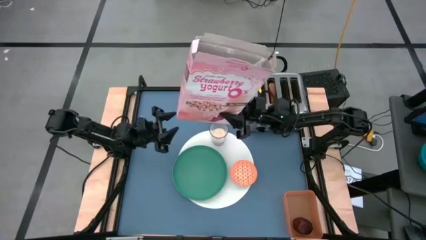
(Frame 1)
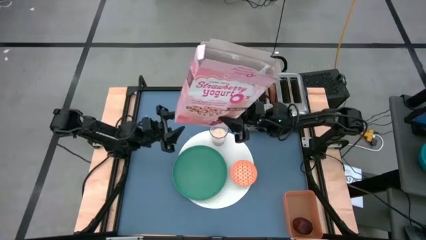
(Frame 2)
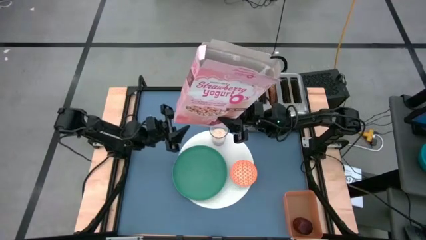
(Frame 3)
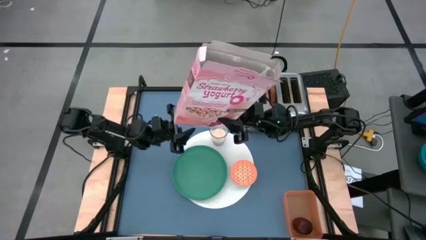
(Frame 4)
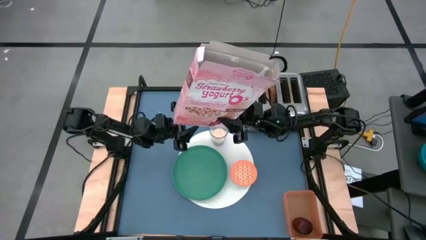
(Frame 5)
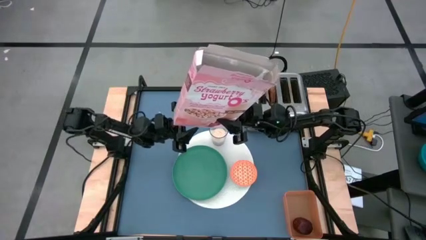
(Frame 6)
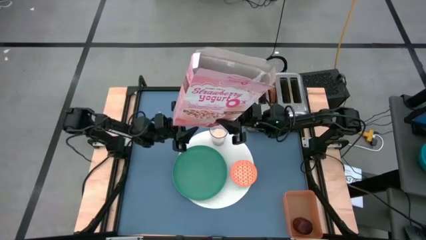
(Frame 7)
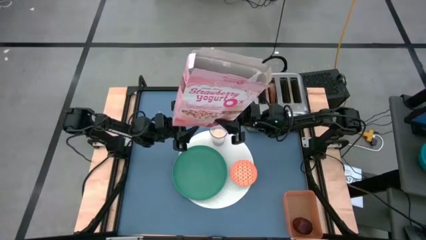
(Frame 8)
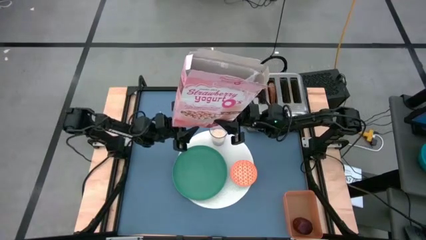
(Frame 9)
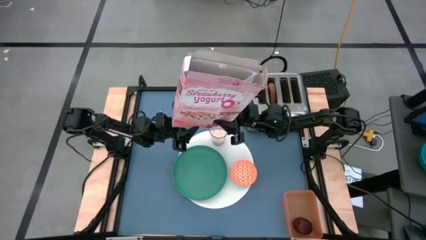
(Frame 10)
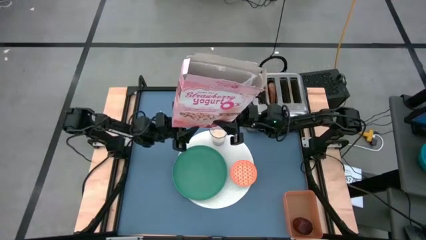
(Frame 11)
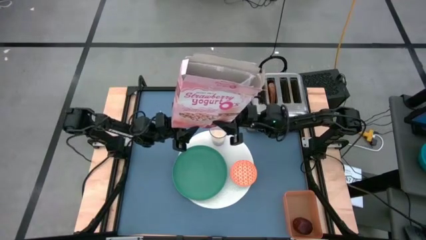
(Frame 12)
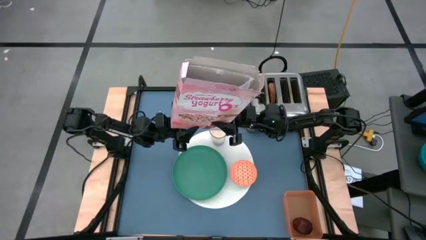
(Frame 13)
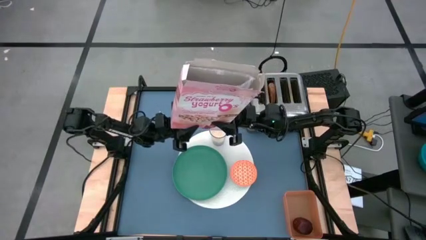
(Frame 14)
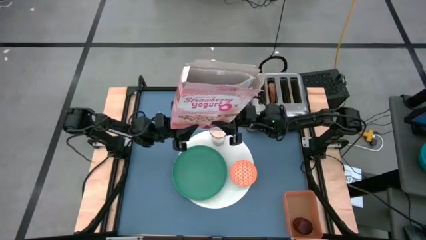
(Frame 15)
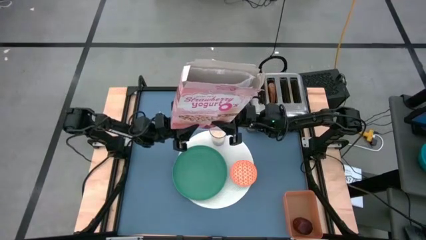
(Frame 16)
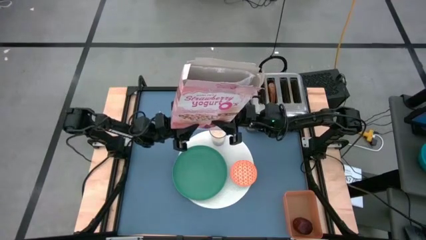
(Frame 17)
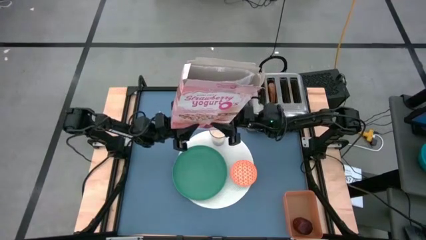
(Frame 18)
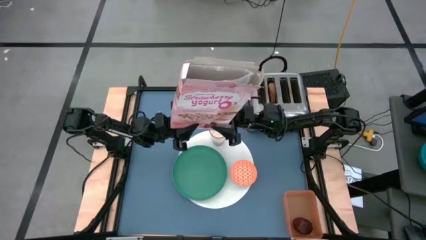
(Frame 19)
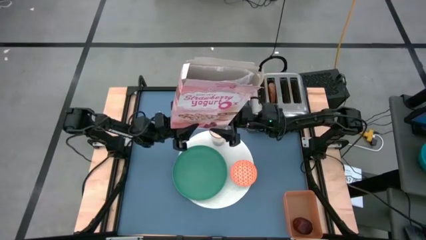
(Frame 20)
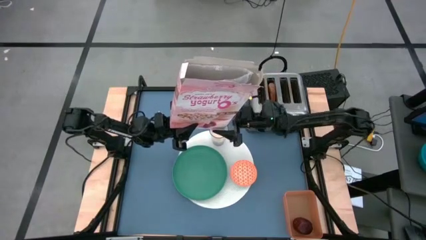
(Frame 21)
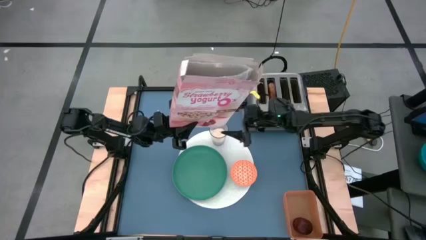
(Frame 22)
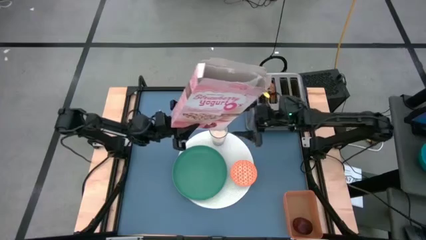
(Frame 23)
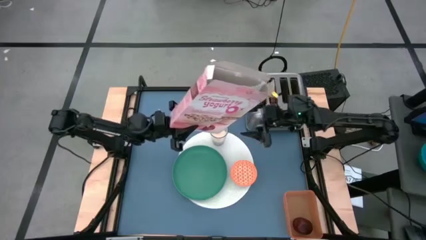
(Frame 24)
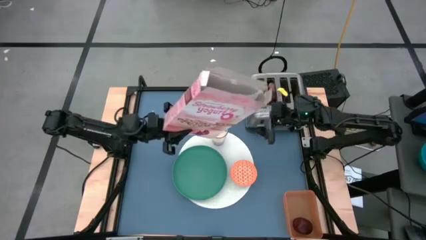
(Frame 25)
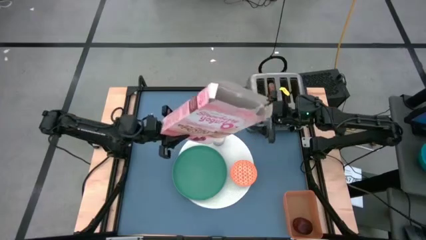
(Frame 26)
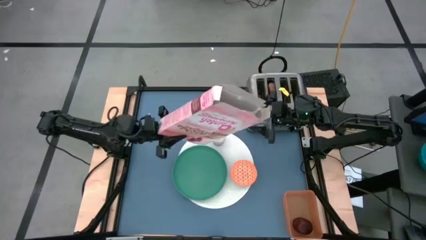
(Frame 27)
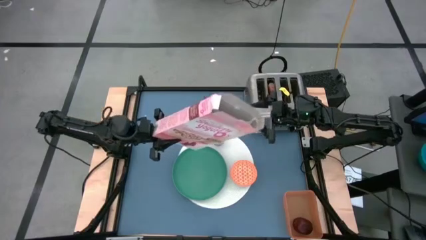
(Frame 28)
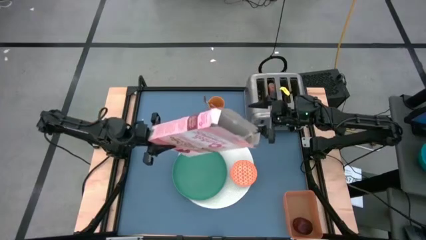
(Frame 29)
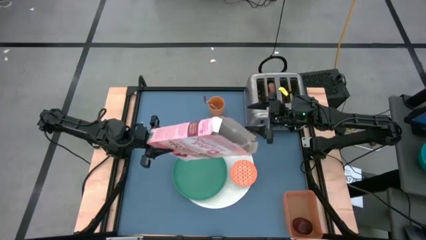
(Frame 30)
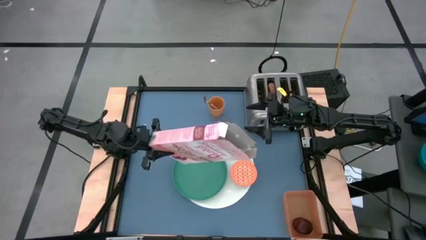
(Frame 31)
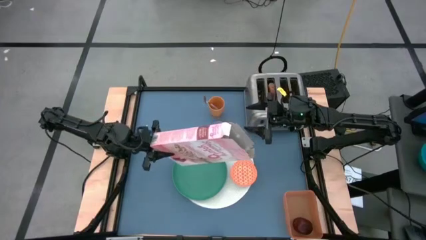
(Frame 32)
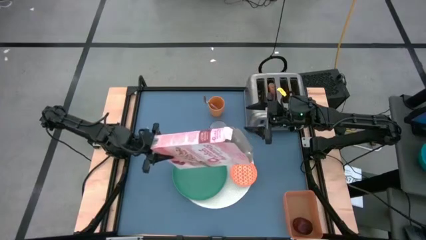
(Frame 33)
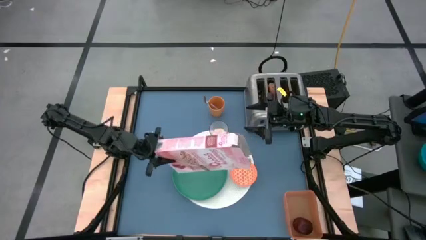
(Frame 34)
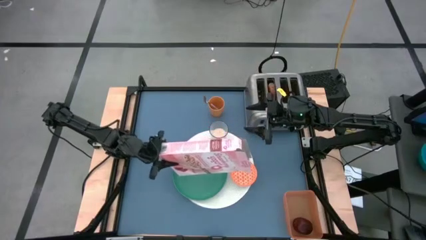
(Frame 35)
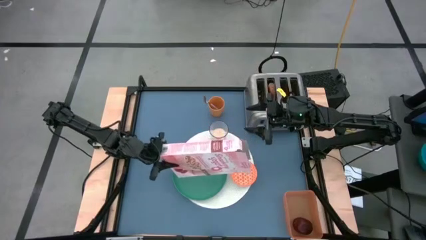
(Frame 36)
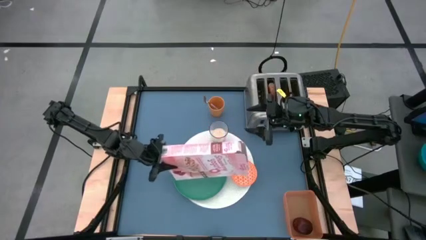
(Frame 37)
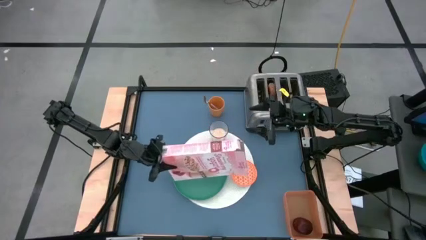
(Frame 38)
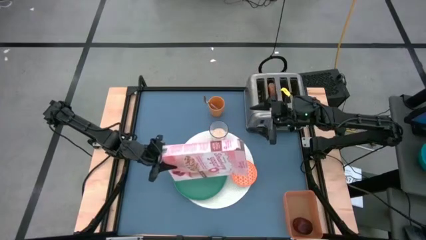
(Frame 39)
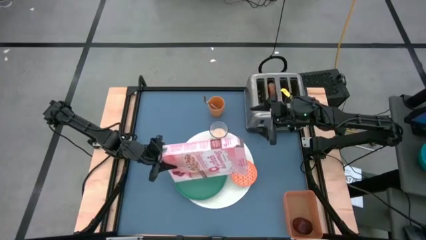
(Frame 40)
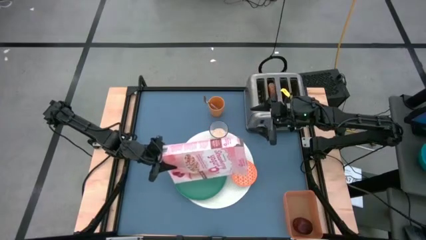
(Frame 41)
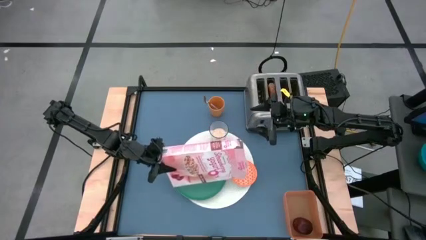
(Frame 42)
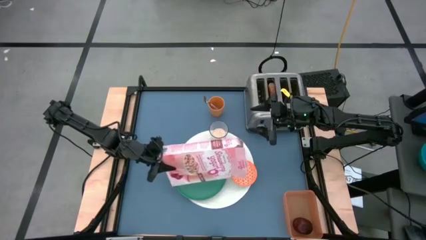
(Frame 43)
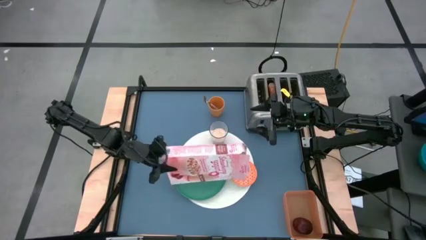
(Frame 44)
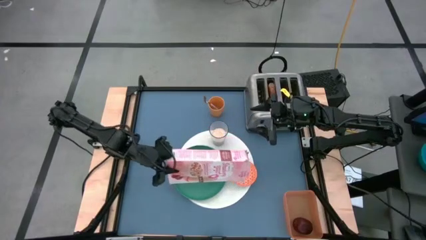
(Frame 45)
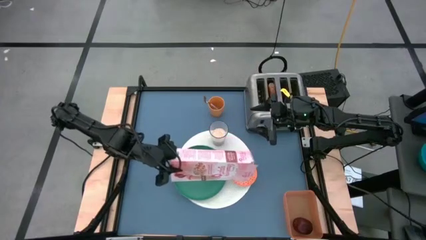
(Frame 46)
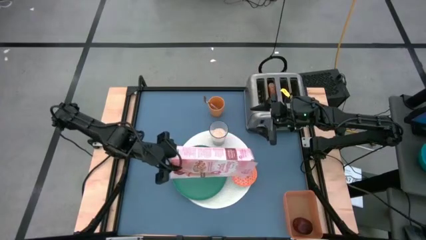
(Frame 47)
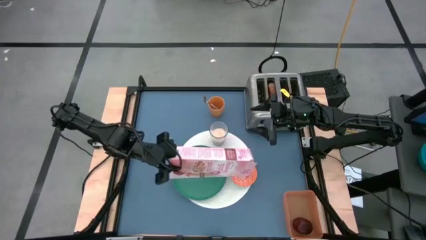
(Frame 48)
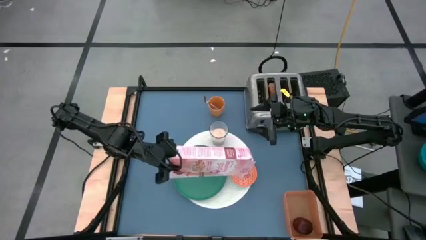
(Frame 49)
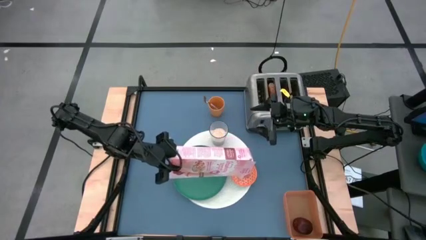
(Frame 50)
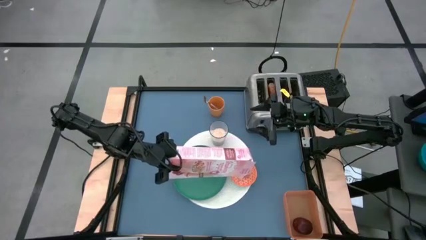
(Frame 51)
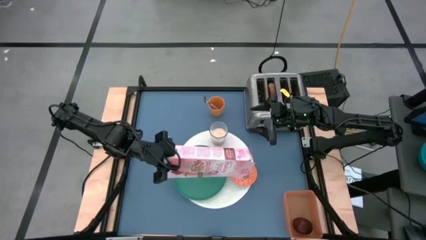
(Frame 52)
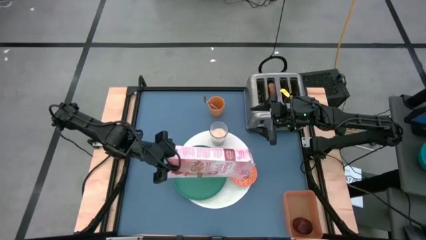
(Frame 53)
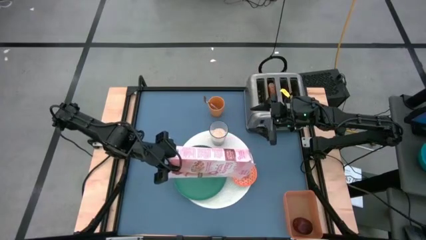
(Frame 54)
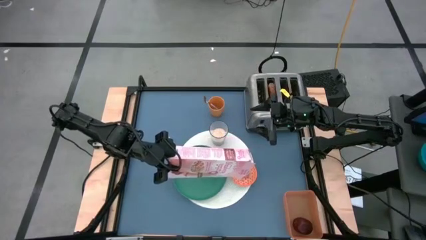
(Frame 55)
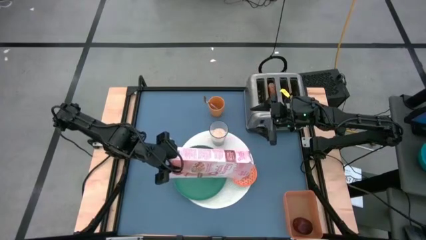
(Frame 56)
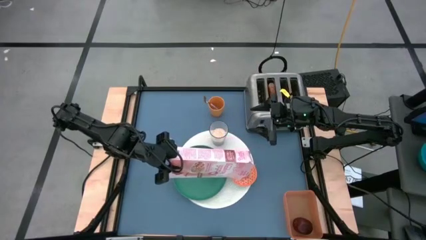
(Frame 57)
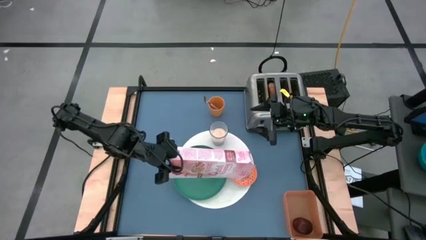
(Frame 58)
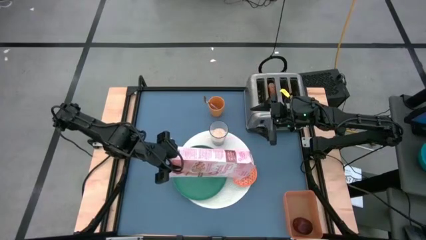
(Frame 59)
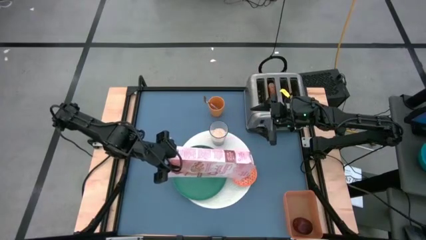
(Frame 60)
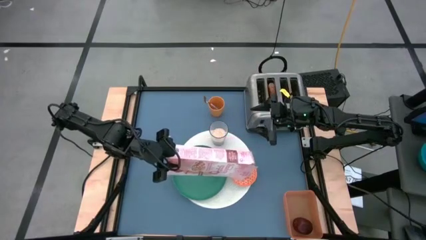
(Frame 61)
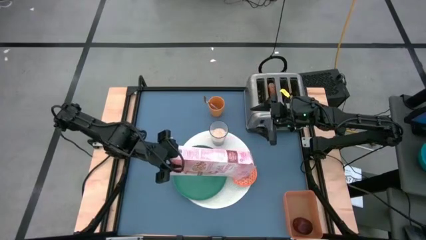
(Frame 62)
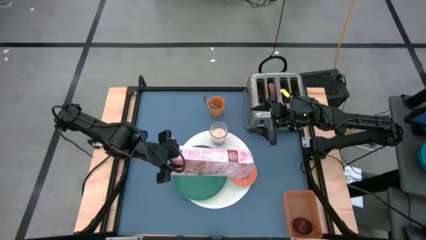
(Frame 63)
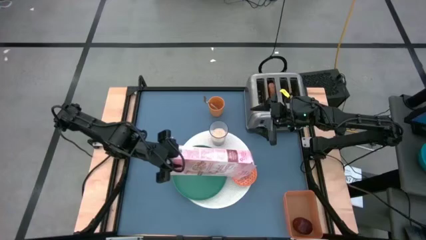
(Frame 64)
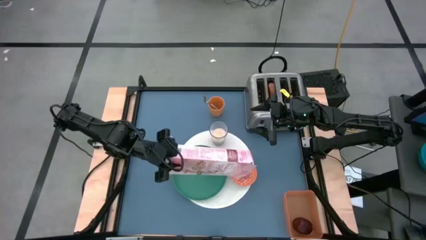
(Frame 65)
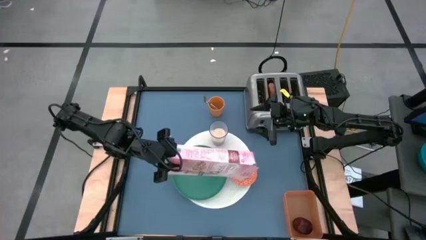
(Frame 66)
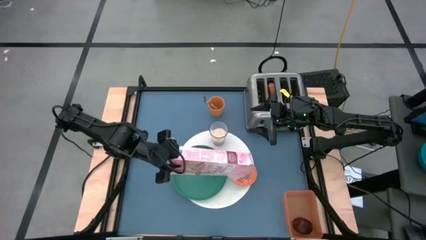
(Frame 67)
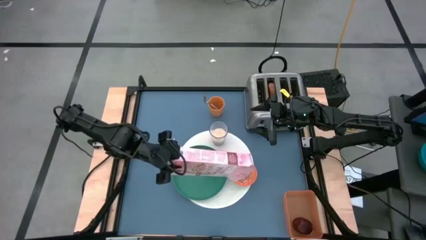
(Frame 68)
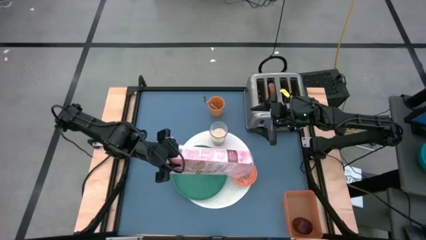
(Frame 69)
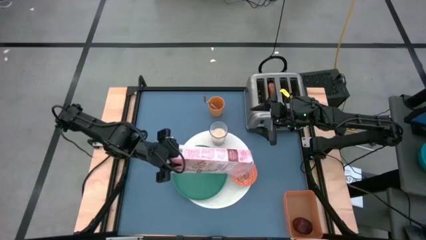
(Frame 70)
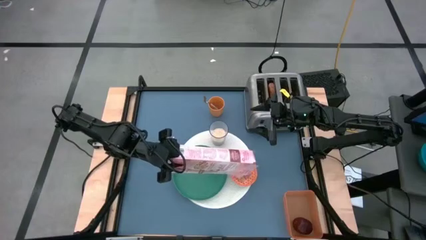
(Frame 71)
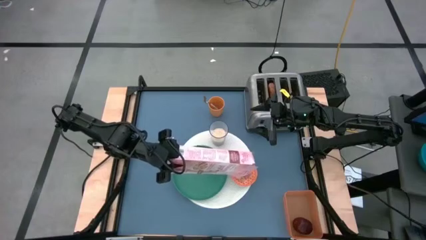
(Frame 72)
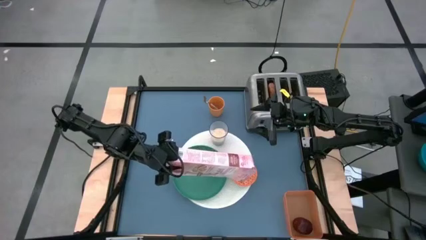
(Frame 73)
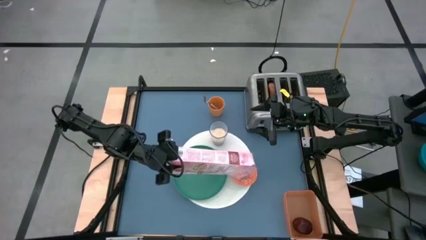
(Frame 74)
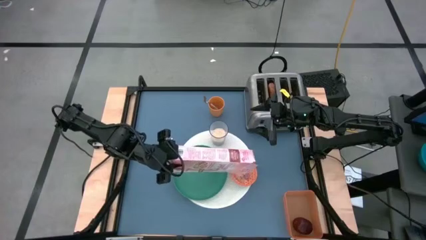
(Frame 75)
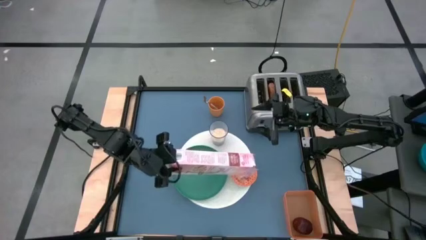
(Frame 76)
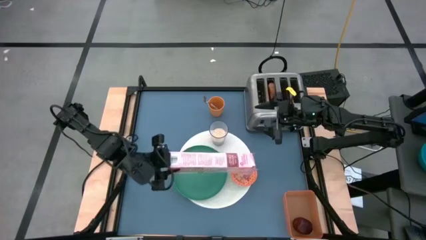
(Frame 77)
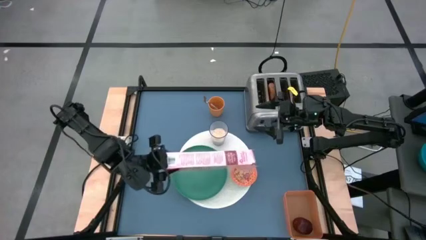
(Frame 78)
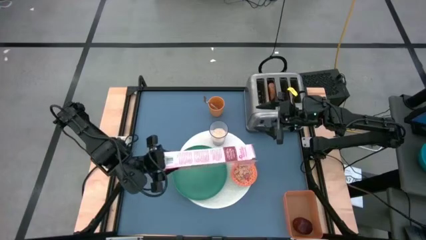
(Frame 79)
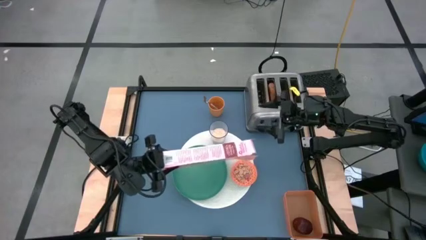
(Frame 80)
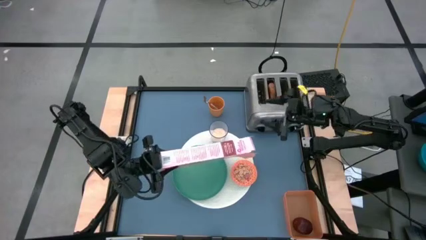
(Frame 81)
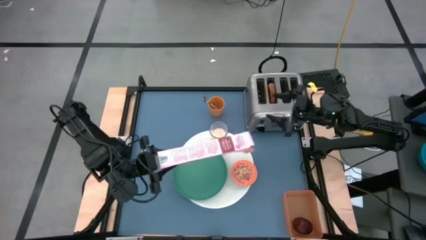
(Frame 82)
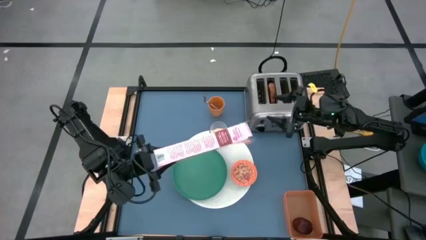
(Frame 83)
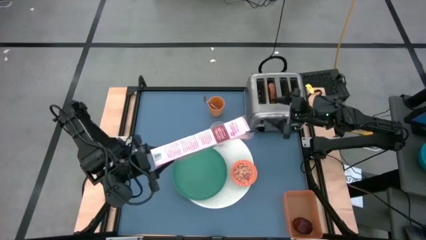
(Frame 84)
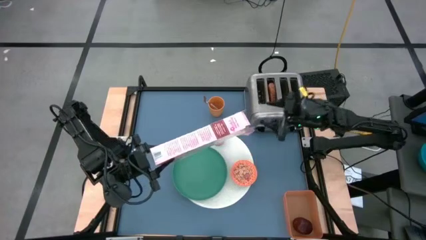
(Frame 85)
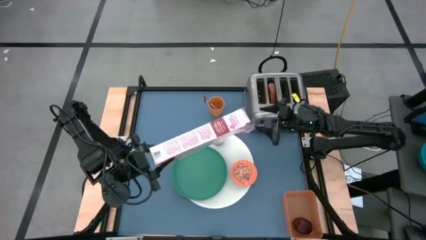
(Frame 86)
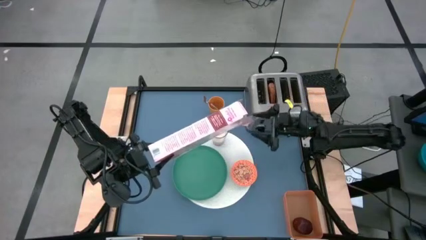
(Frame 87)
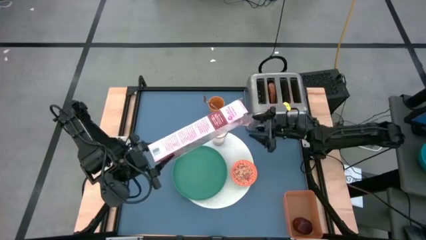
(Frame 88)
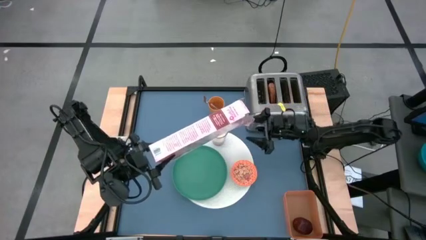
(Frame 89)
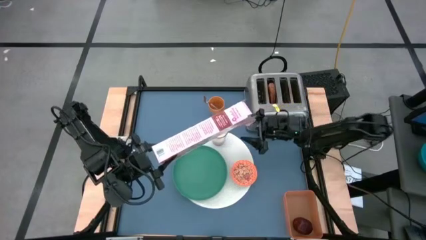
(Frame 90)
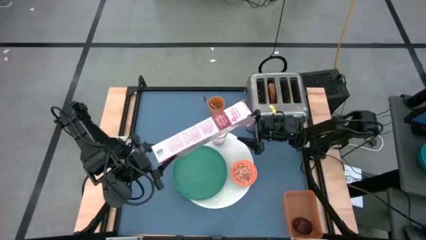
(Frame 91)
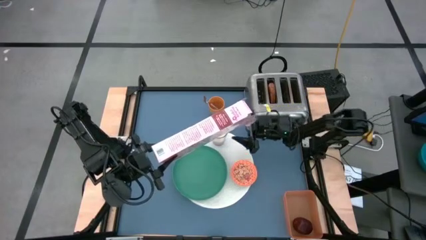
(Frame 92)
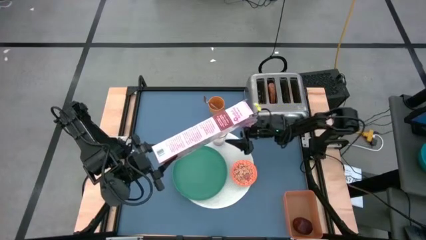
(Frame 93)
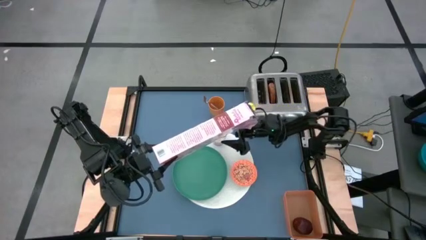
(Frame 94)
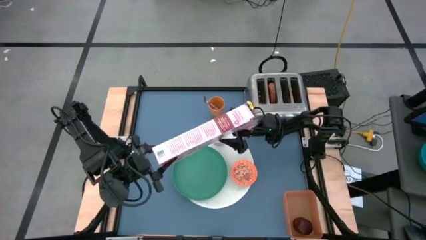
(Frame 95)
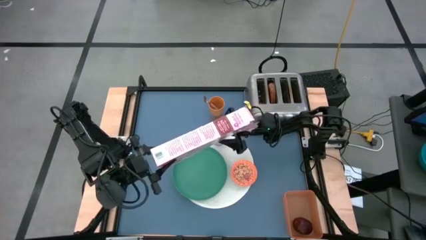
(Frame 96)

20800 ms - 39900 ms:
Task: Arrange a breakfast setting
Pour the cereal from the cereal box into the orange bowl
